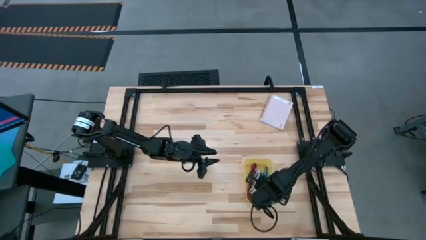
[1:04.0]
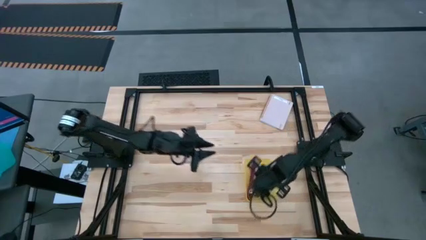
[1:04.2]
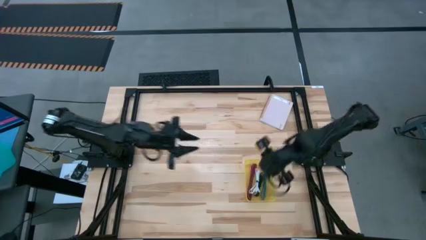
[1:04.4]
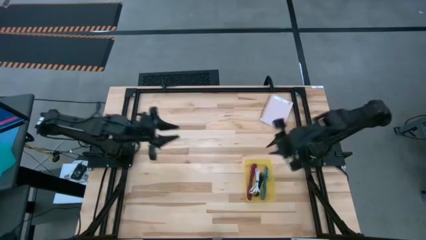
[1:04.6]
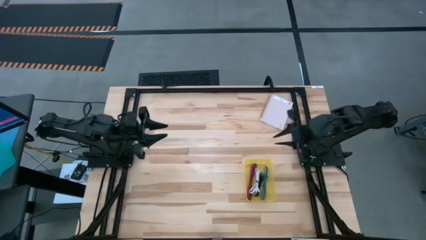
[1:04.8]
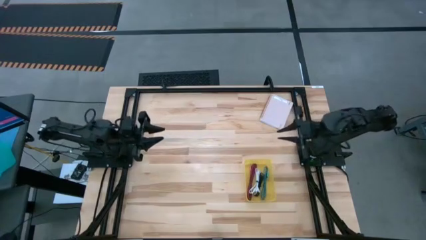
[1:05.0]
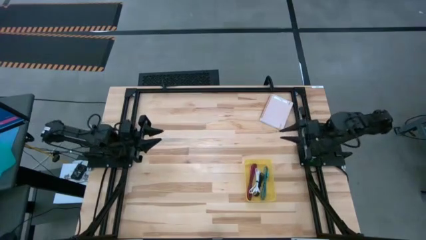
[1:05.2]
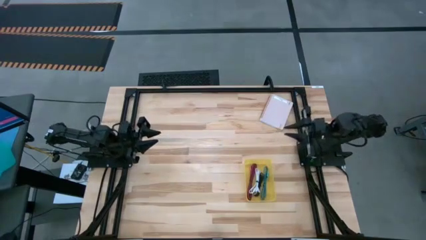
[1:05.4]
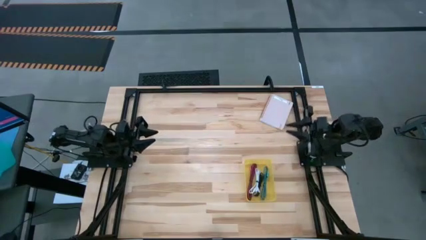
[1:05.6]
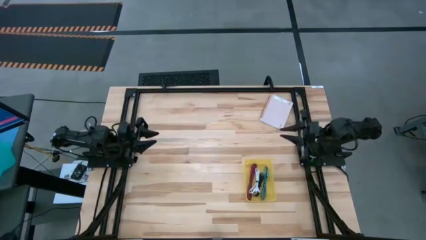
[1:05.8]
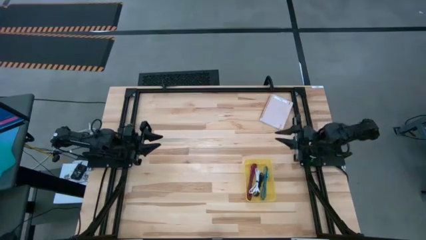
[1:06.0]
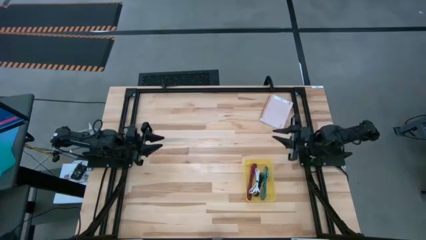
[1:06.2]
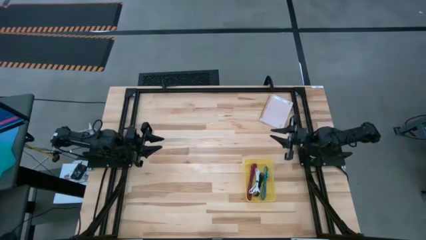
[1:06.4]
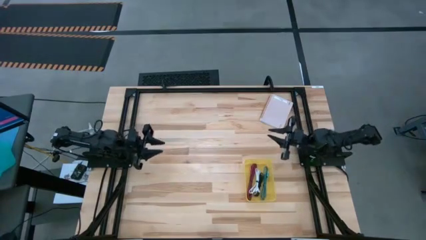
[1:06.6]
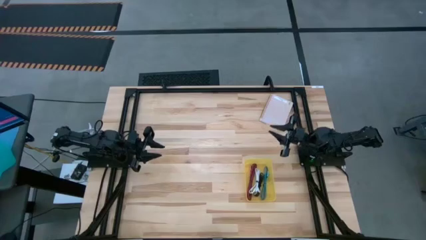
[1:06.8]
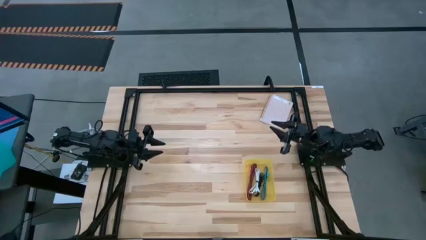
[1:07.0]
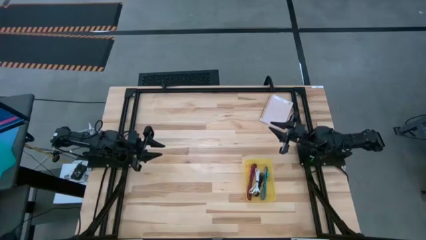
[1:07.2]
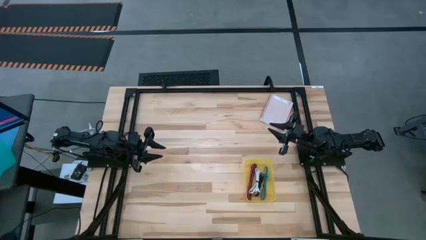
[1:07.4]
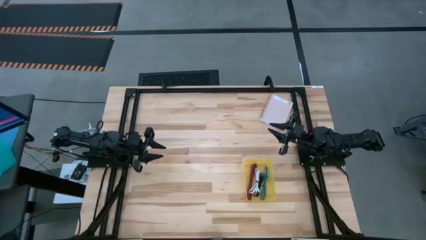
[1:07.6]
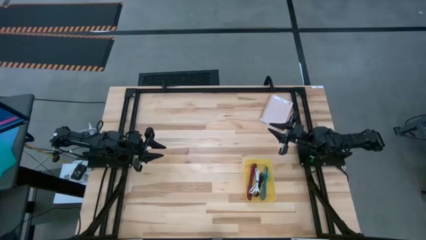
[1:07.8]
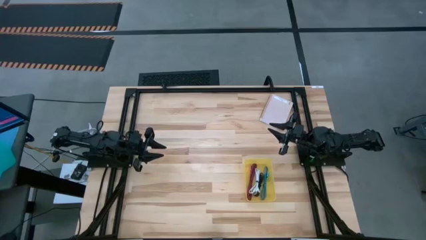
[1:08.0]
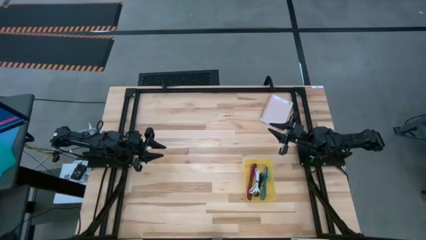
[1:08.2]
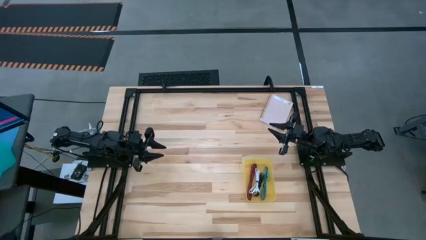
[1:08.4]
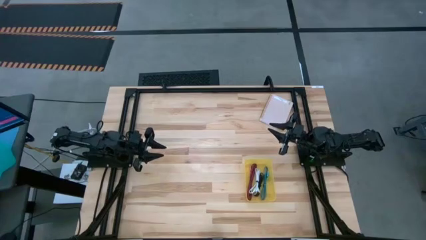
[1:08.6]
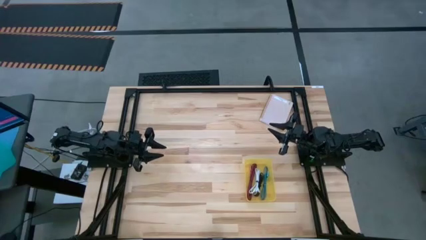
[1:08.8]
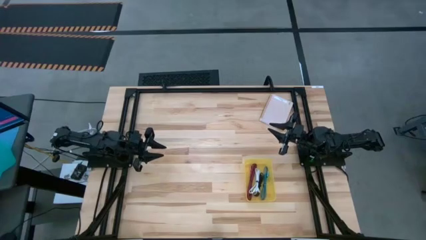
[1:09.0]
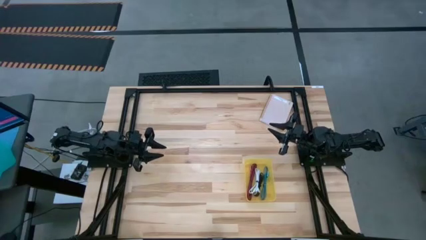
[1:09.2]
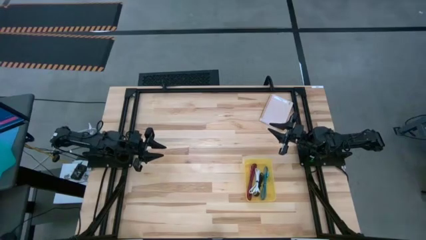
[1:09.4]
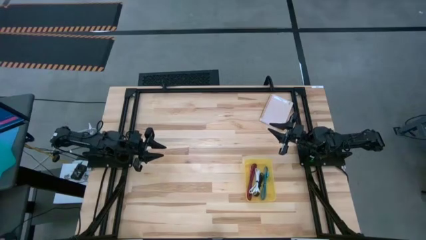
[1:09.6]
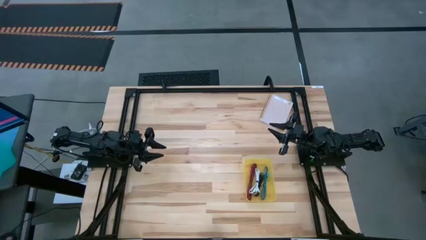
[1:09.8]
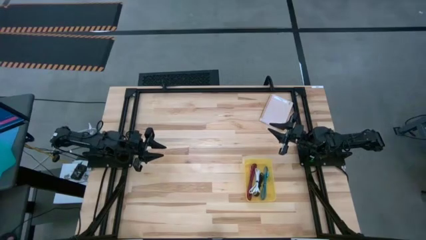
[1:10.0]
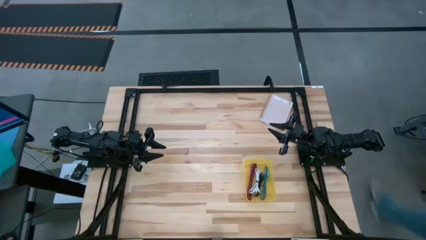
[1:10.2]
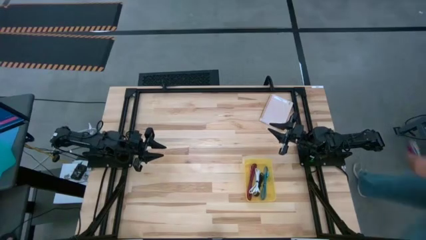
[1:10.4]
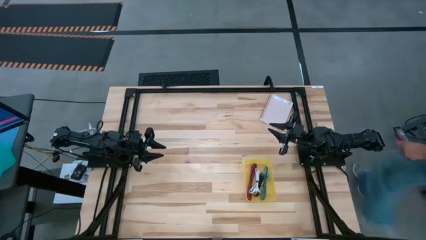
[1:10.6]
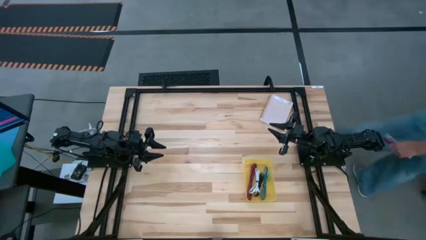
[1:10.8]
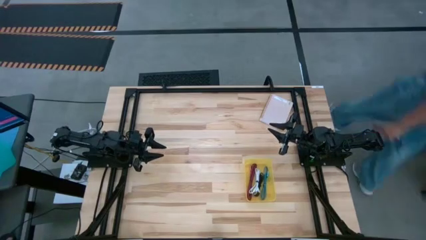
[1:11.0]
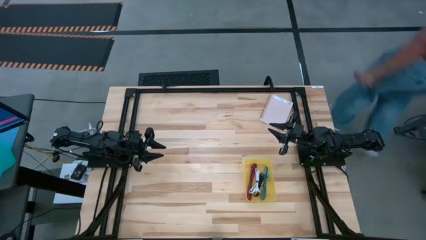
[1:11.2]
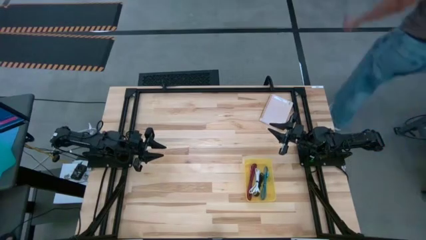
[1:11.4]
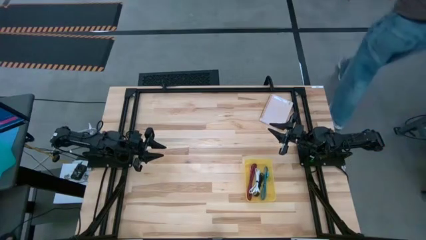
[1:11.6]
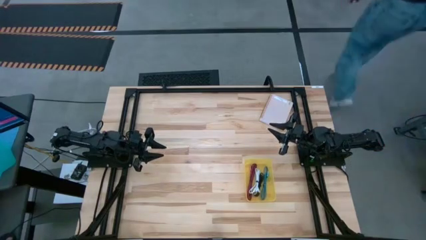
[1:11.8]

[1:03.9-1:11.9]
Task: Pick and place USB-C Cables
Return to Home Position

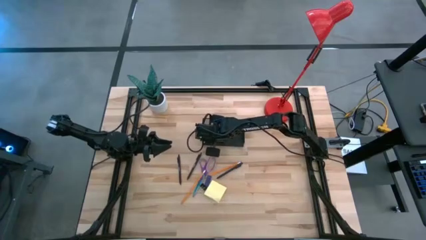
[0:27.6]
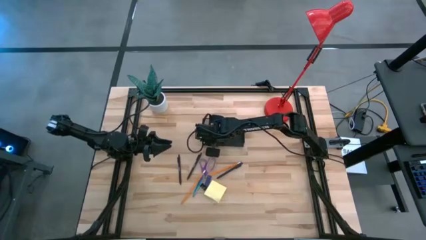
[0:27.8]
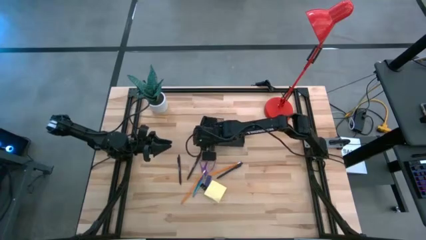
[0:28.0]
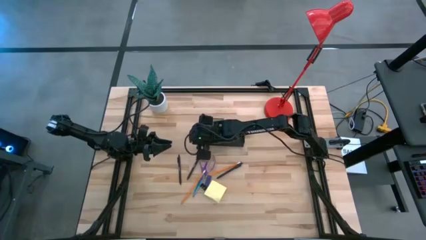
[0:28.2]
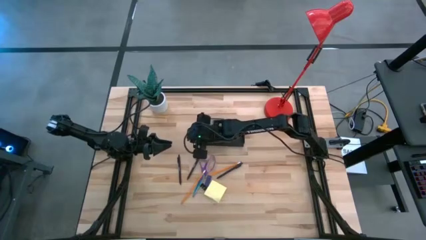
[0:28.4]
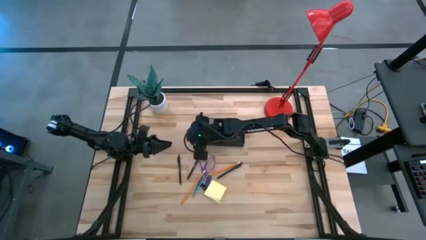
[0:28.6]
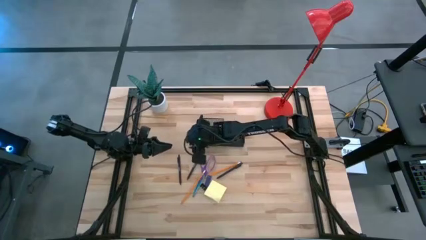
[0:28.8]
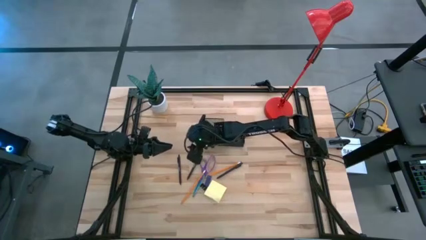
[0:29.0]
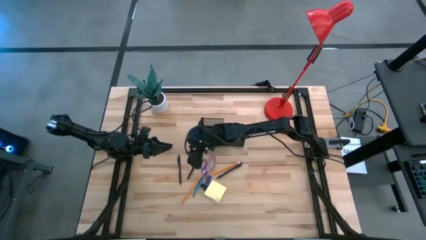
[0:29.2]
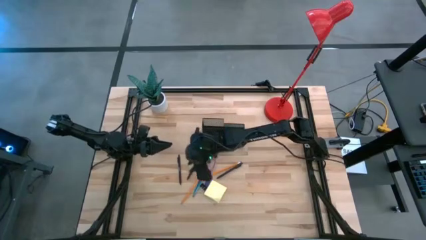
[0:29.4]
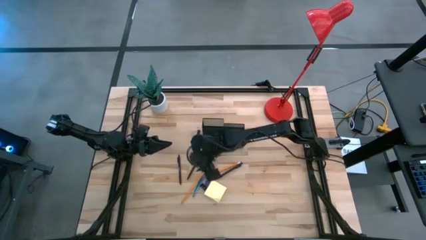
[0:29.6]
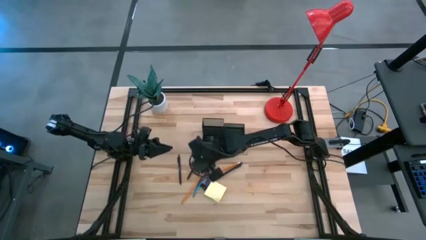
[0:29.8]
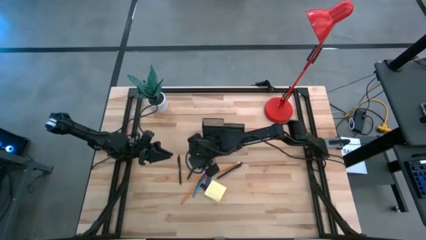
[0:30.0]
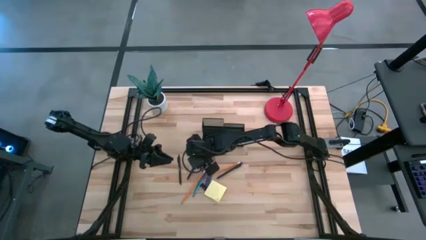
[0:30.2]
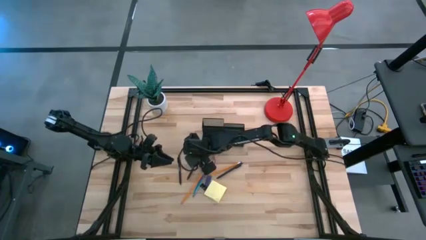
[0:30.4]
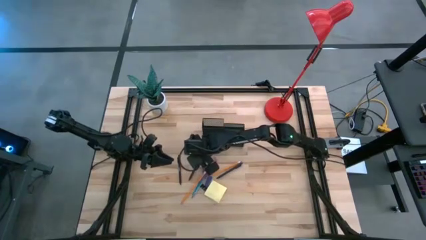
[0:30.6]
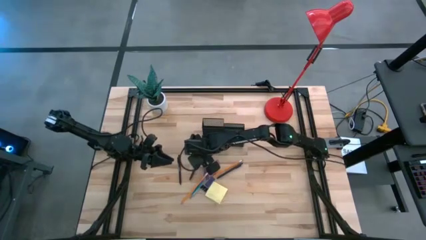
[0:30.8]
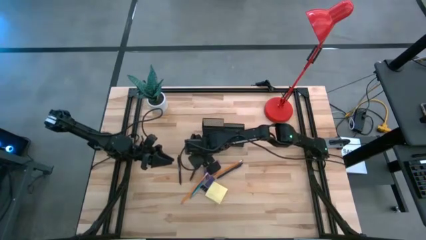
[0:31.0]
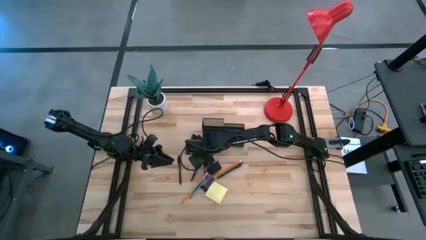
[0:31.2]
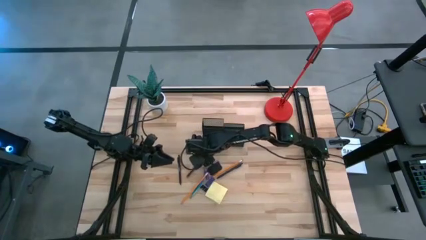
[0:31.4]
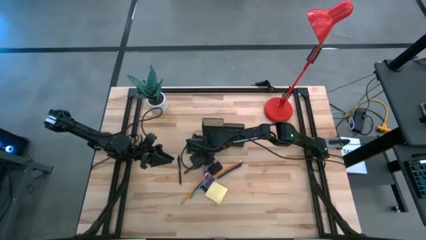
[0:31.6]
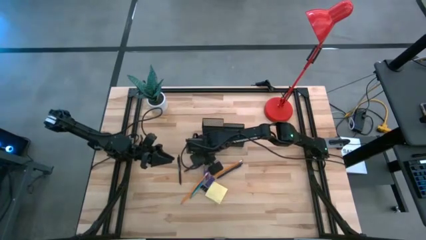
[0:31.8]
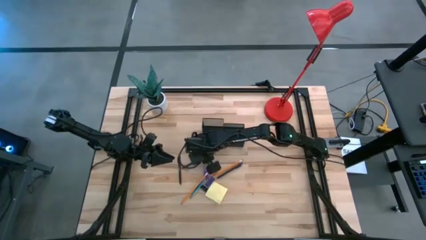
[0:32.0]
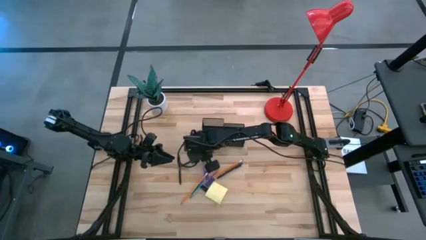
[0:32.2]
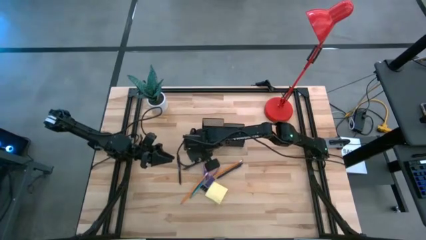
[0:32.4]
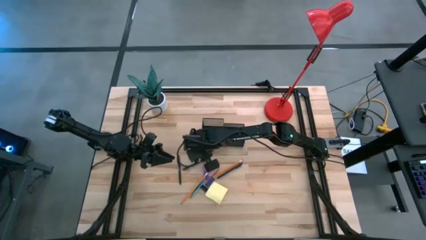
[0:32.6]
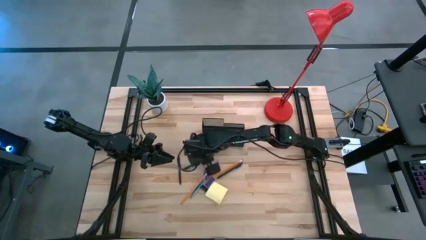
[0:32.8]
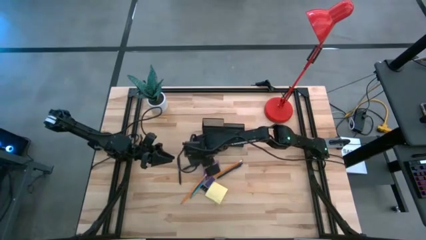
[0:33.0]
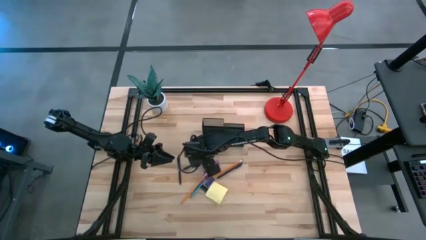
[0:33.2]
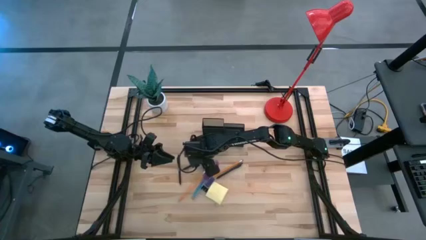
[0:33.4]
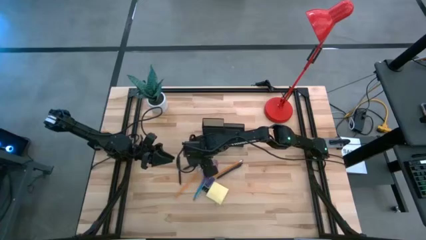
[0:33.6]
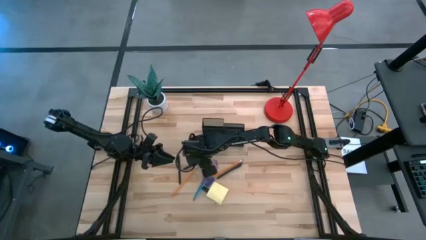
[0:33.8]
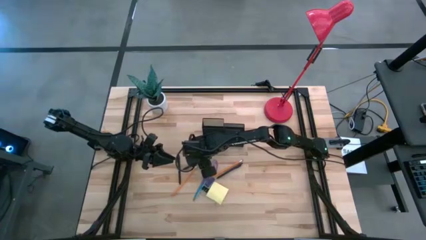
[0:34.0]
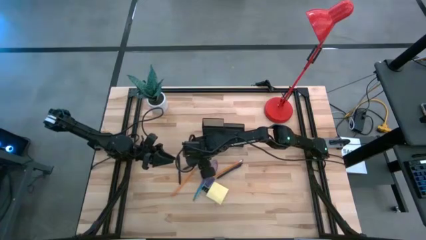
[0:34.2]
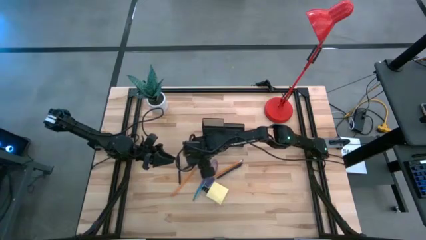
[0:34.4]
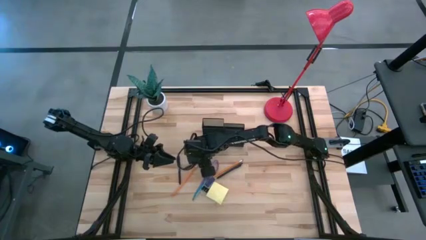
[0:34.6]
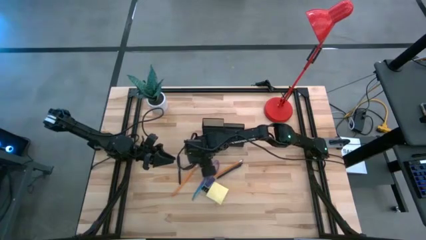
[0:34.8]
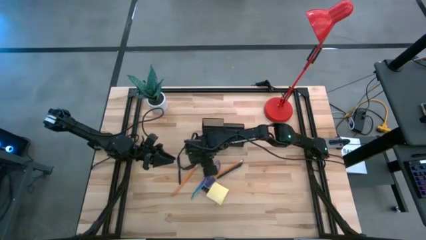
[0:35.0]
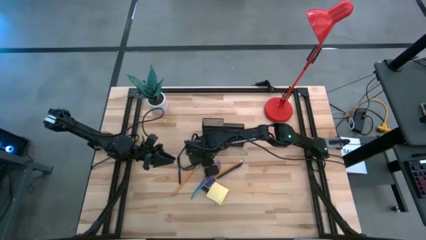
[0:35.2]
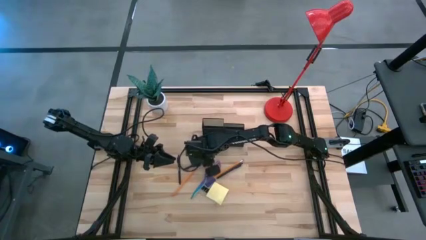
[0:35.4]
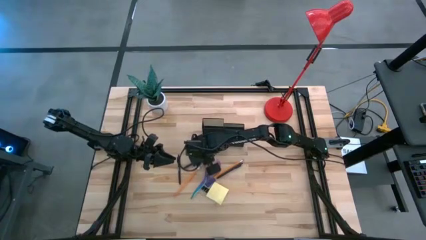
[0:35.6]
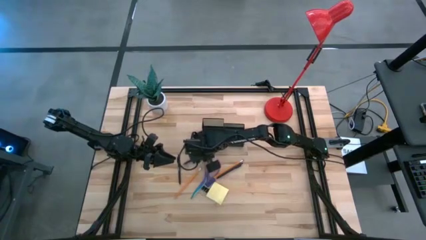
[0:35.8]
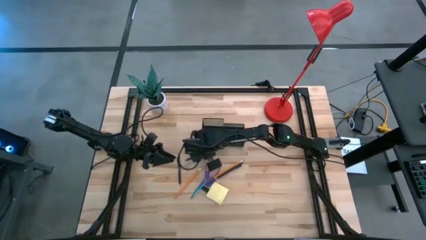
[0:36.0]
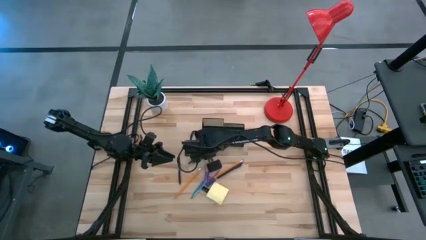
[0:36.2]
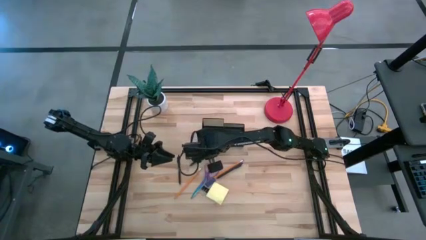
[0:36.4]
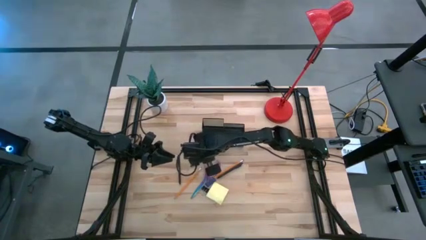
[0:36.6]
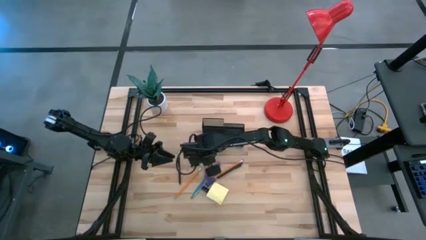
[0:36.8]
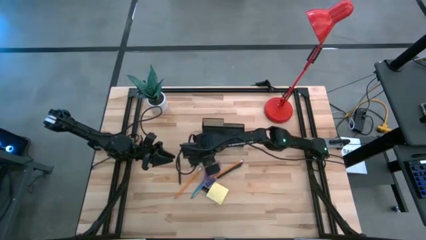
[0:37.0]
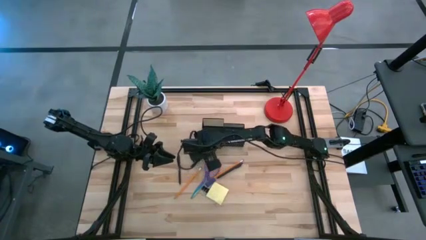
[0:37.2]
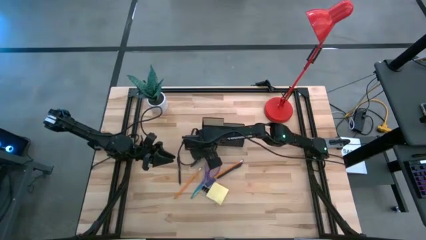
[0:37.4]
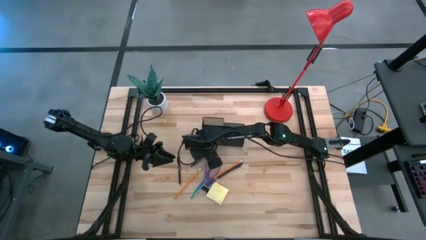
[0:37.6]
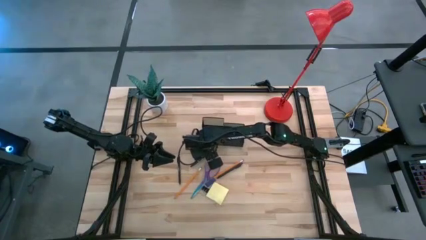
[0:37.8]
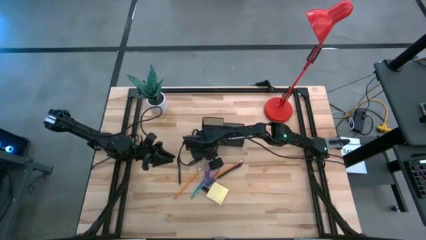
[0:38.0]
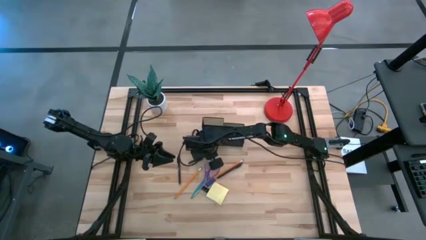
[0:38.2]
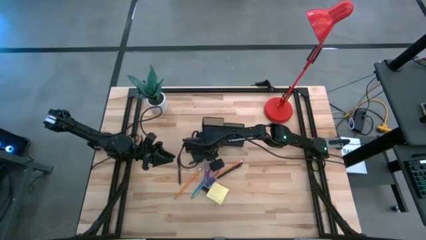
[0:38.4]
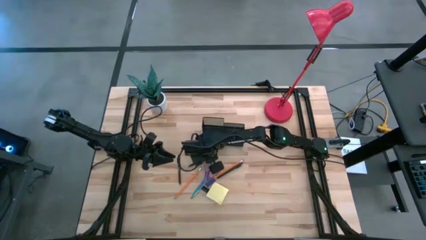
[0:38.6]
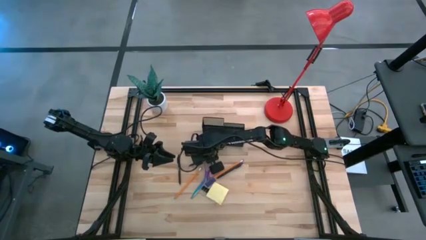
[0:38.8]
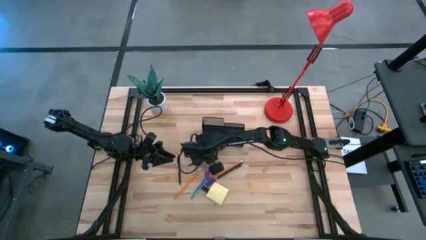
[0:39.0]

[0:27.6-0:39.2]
Task: Pick and place office supplies into organizer
Put the middle black pen into the black desk organizer
